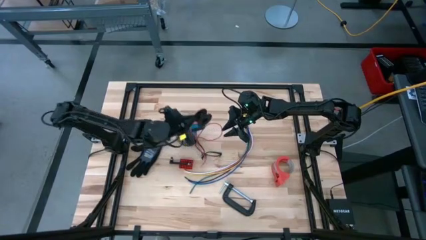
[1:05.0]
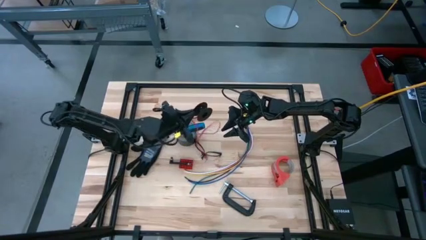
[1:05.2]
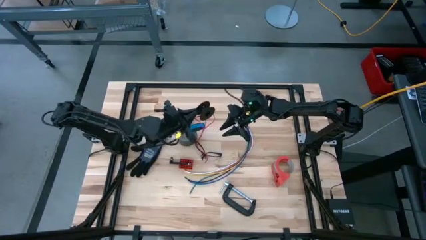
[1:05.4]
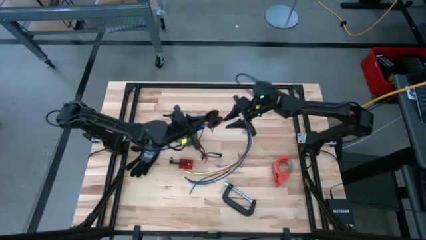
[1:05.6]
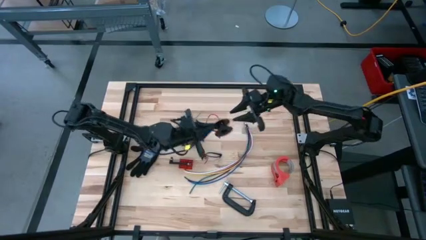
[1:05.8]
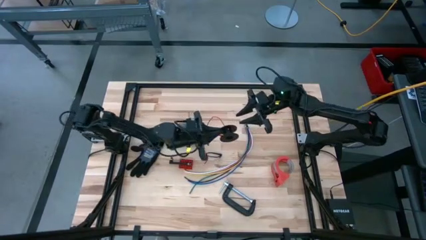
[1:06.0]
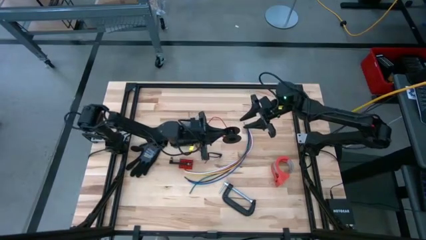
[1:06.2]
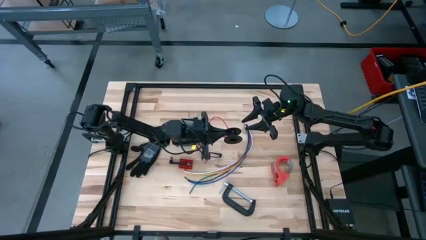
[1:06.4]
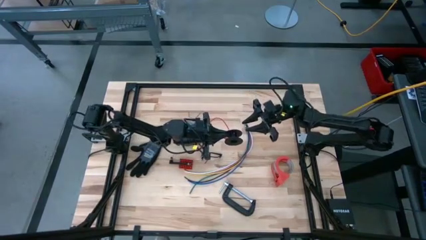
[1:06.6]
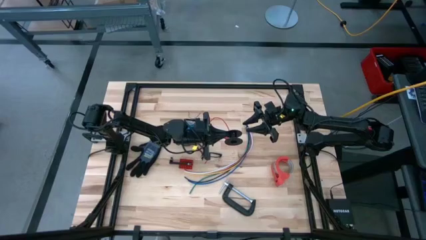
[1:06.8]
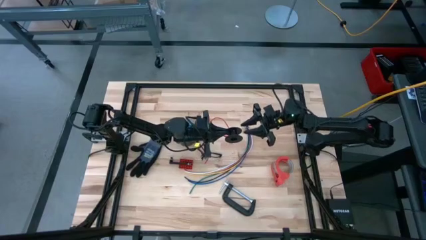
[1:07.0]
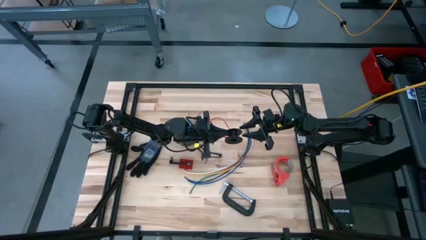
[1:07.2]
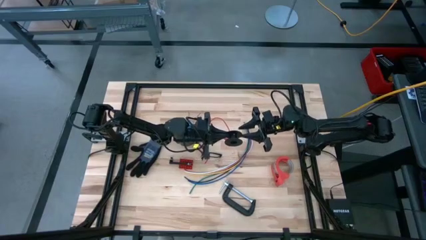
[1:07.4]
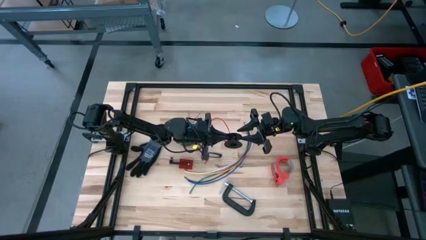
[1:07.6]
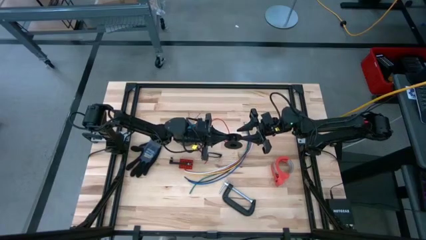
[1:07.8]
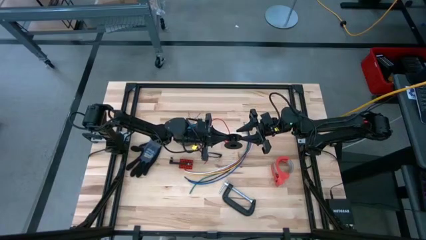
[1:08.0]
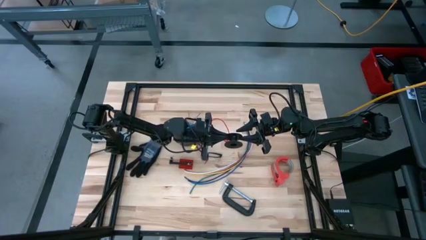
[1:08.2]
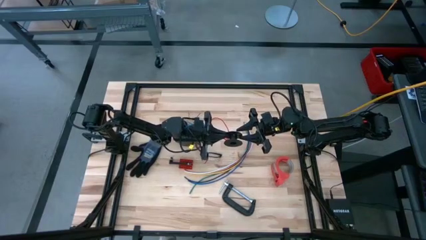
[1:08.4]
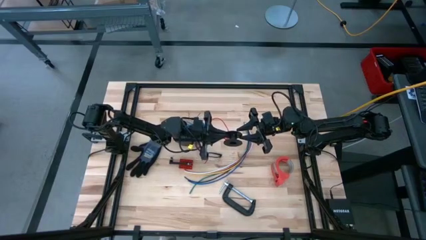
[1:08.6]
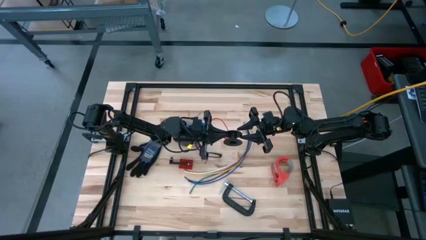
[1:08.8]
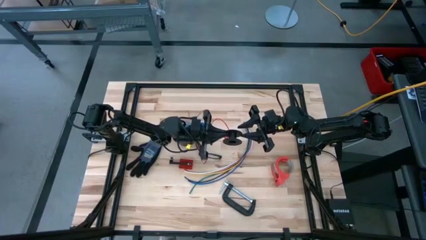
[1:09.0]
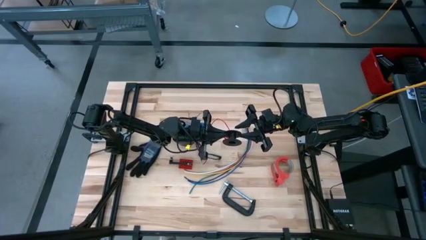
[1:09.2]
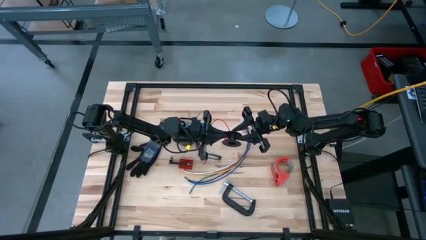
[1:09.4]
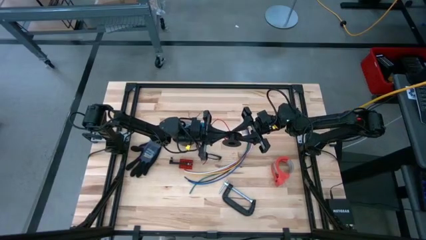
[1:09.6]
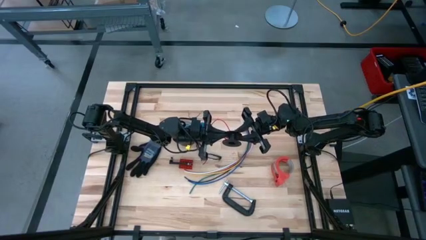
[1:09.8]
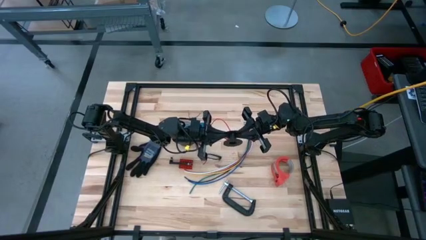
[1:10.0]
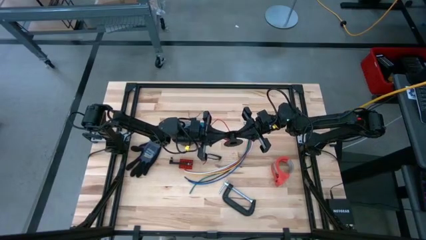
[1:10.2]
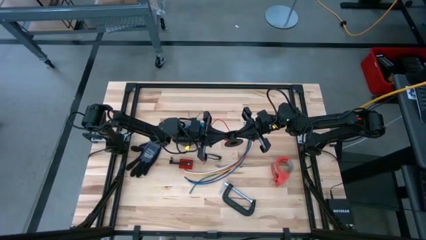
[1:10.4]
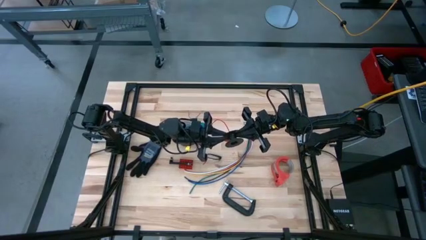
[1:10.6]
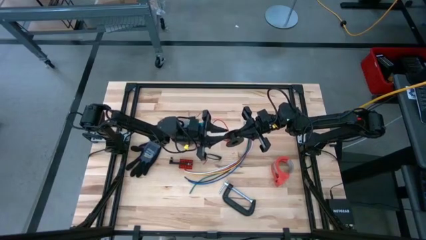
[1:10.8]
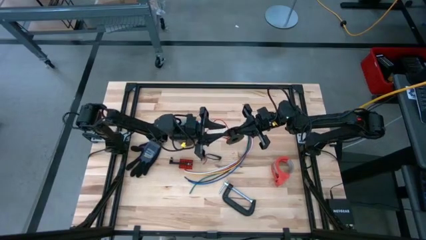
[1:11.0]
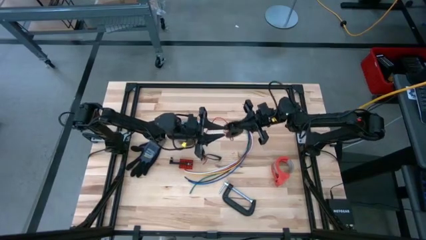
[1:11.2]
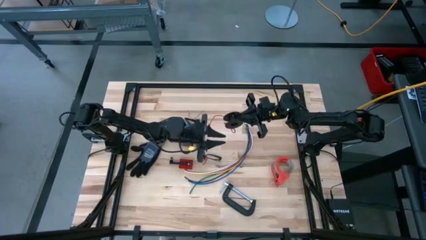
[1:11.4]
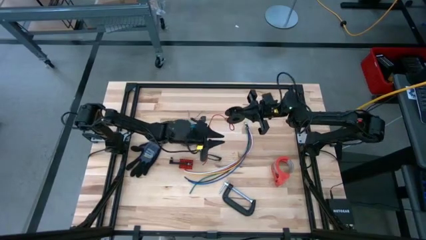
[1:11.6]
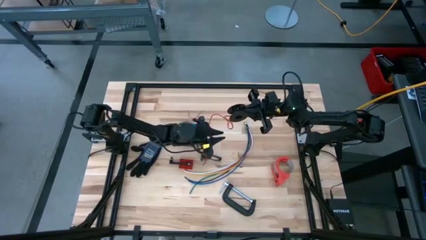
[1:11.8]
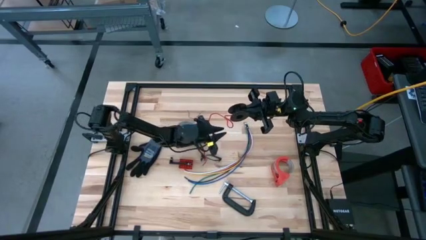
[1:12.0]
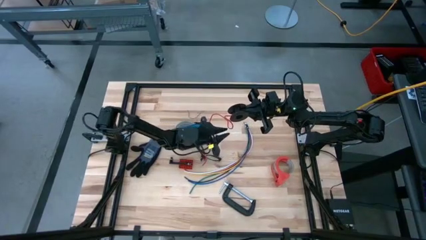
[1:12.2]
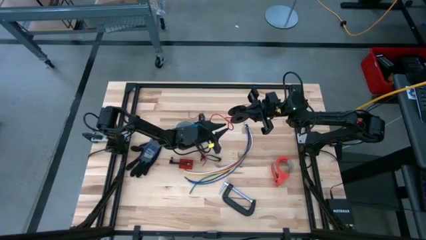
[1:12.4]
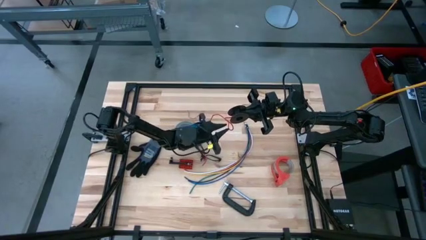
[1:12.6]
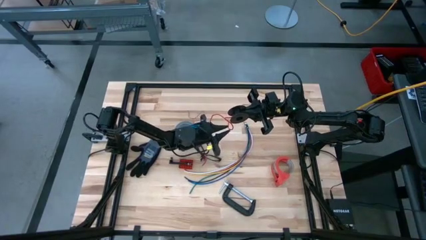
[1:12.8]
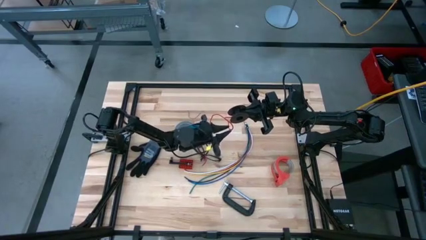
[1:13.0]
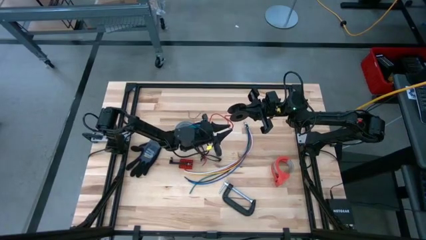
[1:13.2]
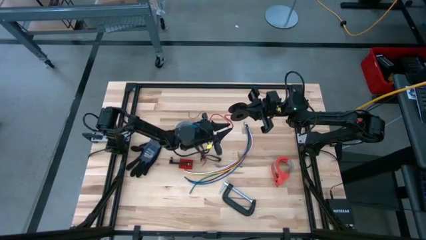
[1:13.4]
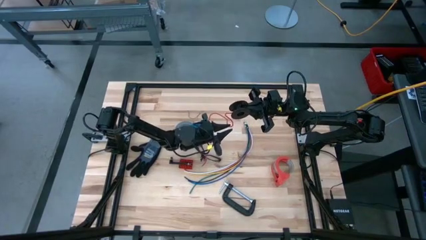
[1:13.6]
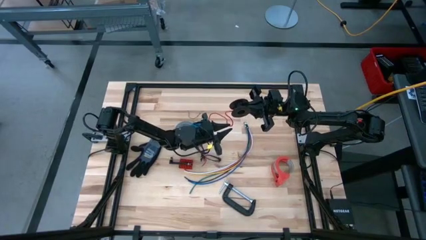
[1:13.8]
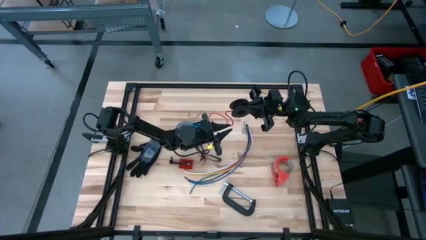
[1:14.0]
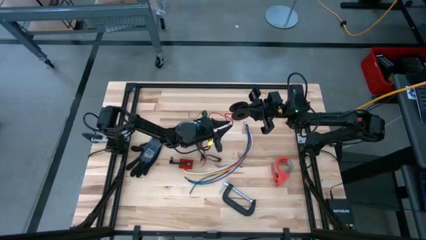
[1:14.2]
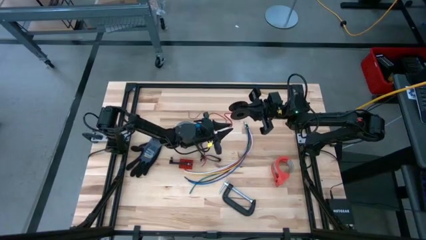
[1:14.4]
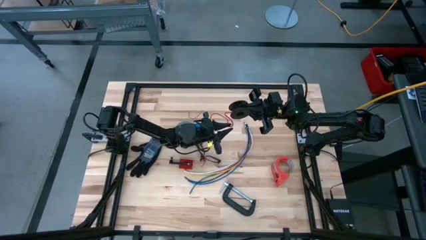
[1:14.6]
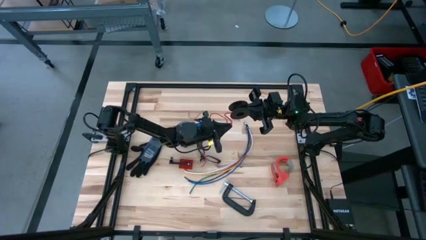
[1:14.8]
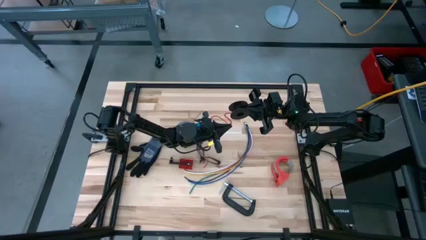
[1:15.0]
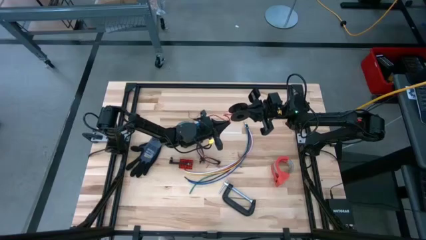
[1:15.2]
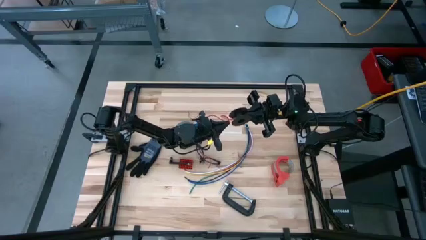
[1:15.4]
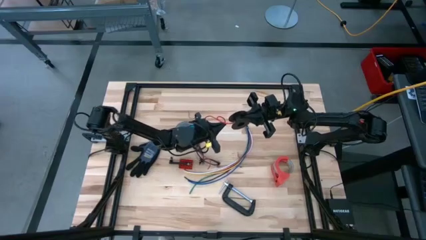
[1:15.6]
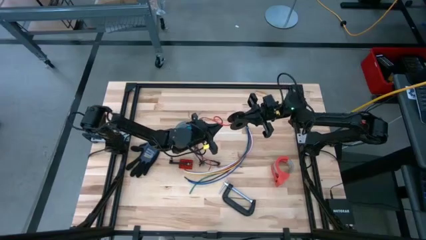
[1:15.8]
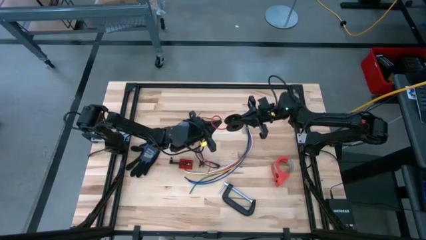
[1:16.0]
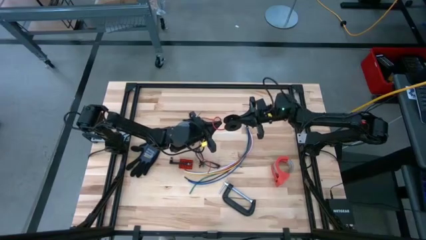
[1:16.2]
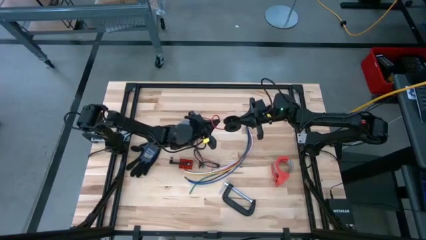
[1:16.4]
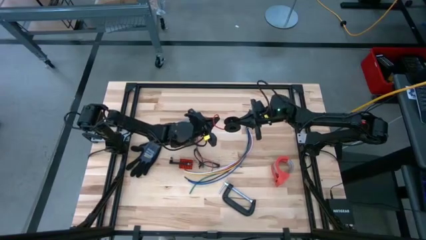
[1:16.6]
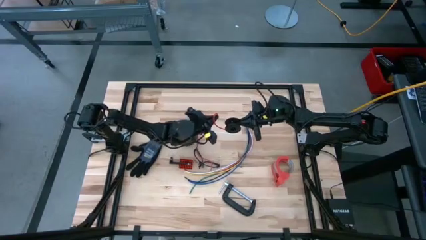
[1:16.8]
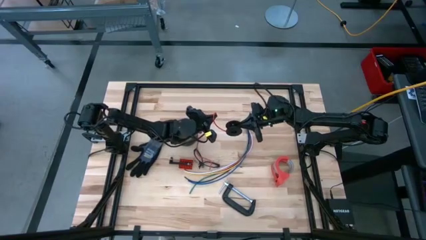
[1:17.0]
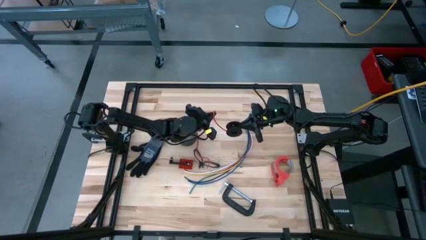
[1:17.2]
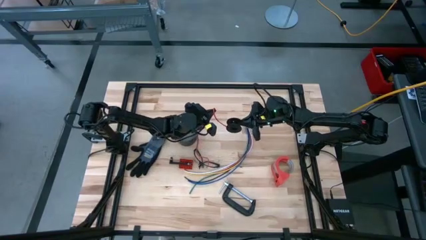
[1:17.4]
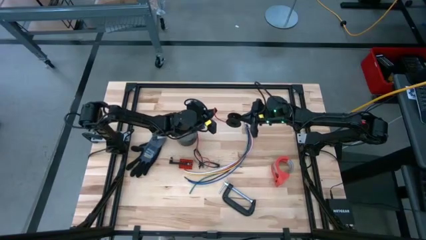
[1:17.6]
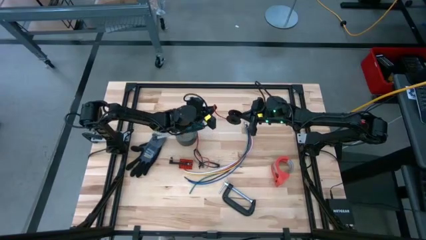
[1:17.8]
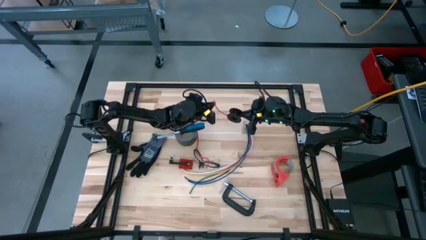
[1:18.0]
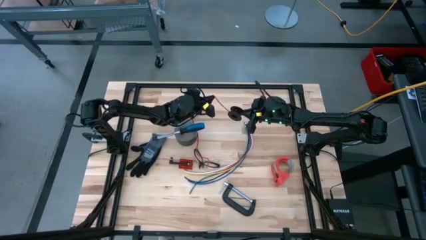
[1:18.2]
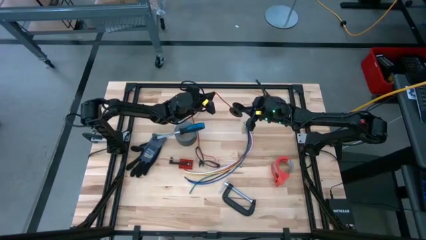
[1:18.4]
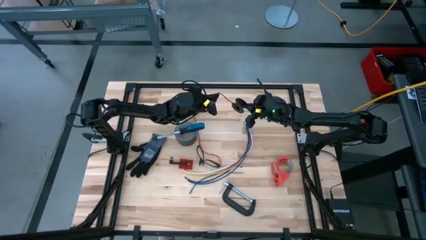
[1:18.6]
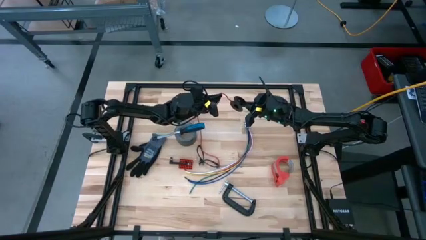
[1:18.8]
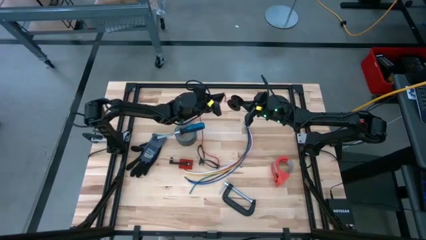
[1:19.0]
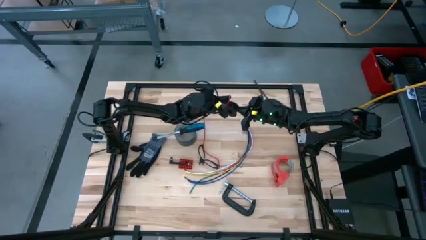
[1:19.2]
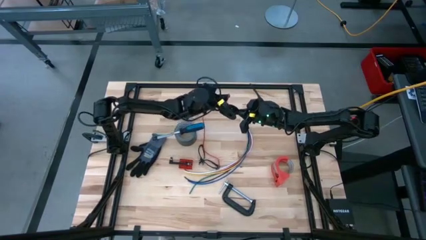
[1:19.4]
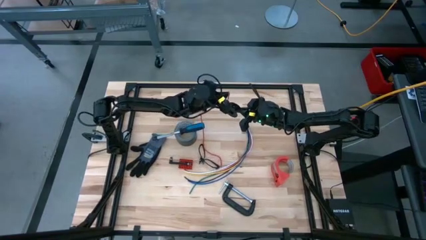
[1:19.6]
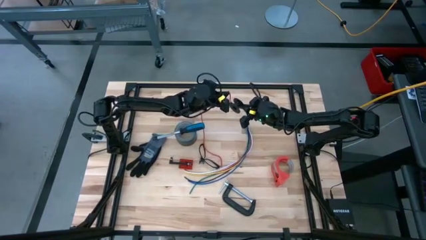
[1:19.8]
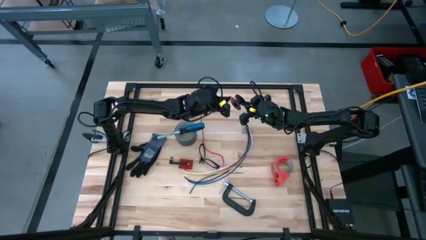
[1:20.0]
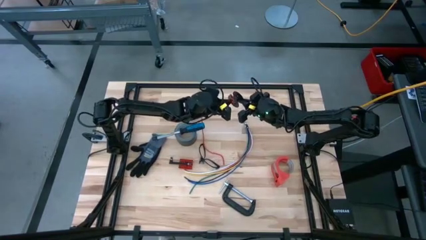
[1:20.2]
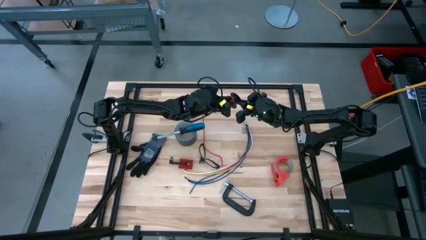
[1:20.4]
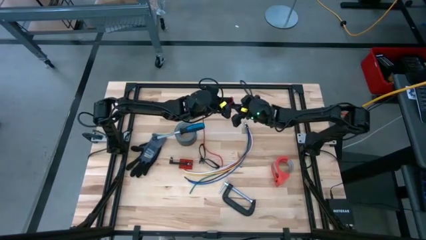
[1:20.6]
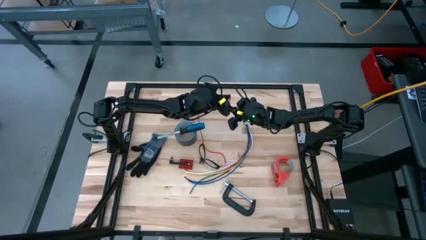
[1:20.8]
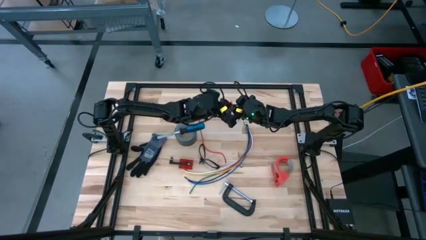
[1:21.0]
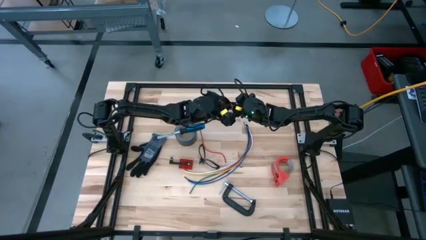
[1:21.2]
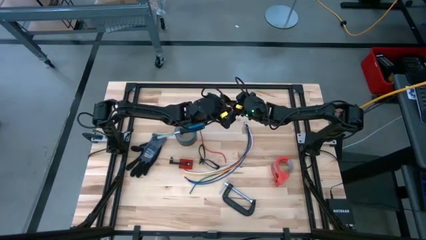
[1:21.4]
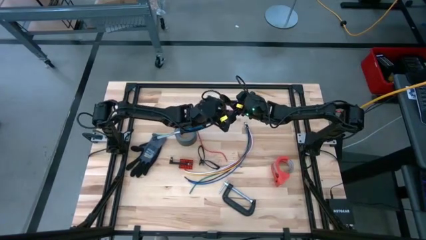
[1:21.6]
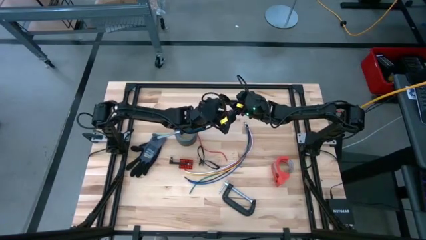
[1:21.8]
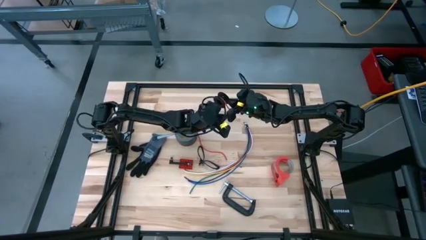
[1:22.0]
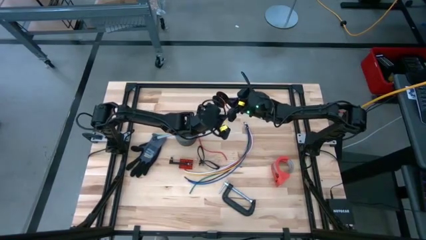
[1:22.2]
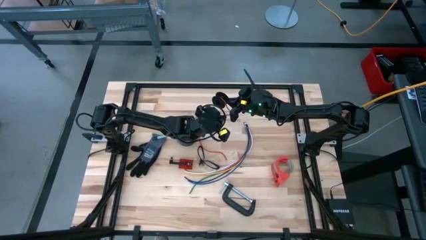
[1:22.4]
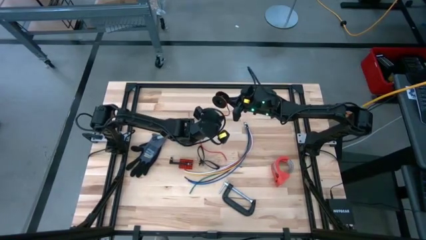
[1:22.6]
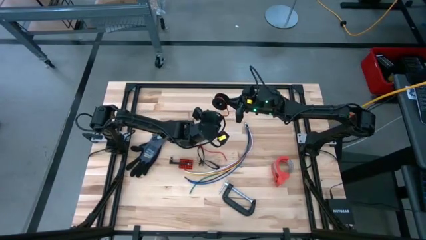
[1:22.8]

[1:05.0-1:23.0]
Task: Coil cords
Coil the red wire onto the spool
